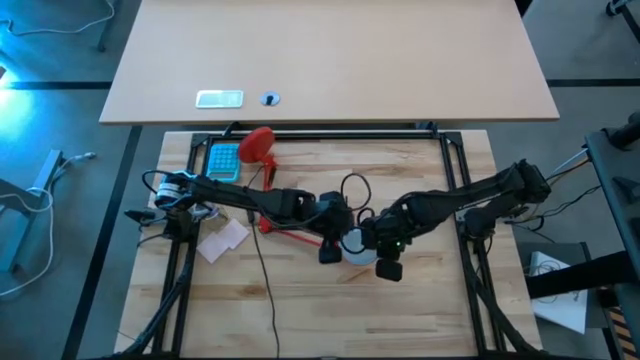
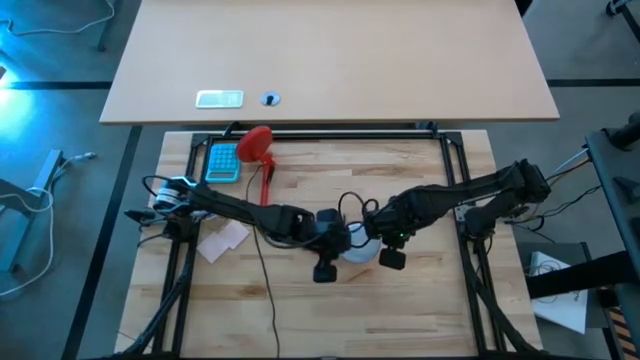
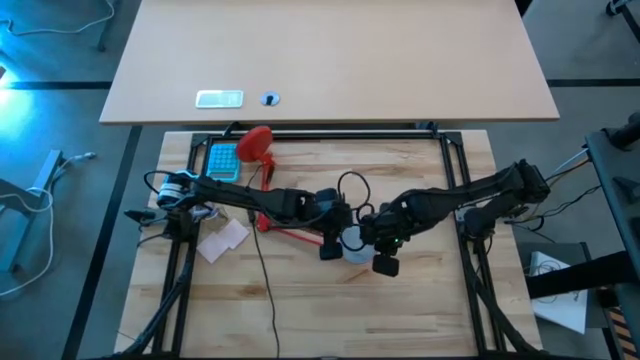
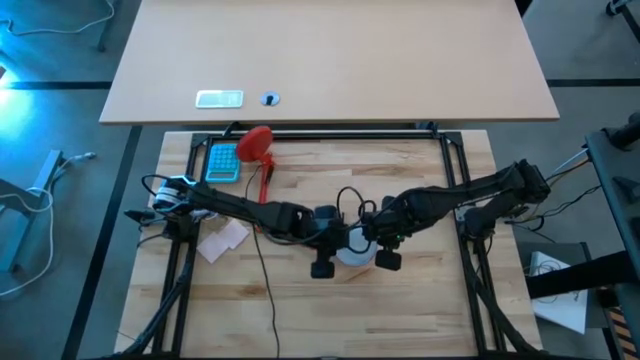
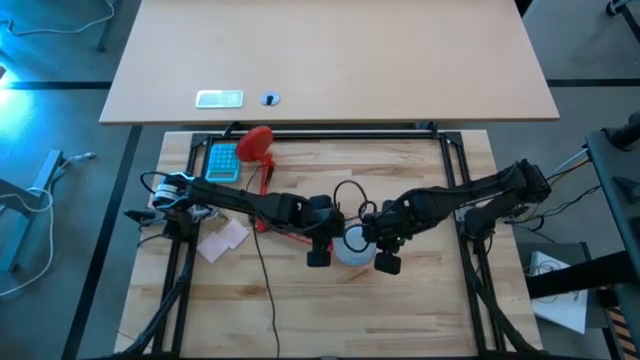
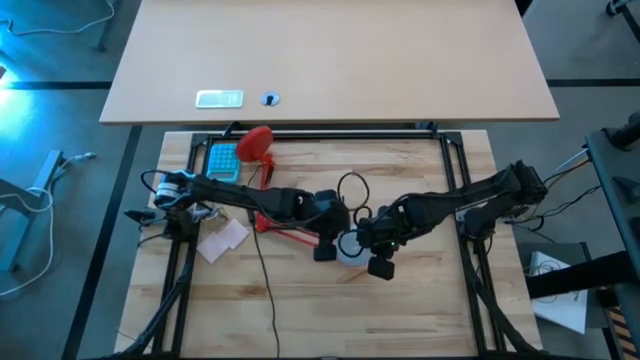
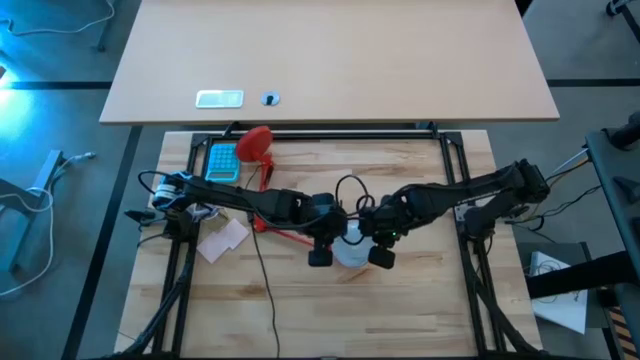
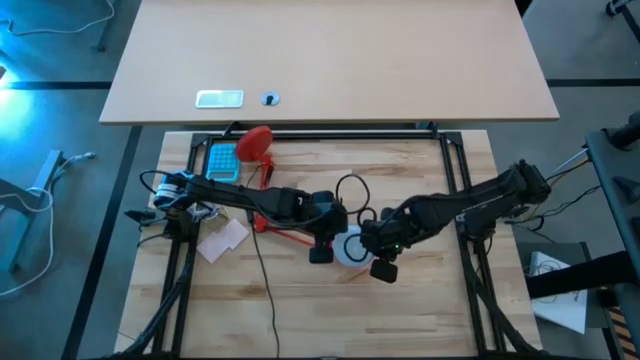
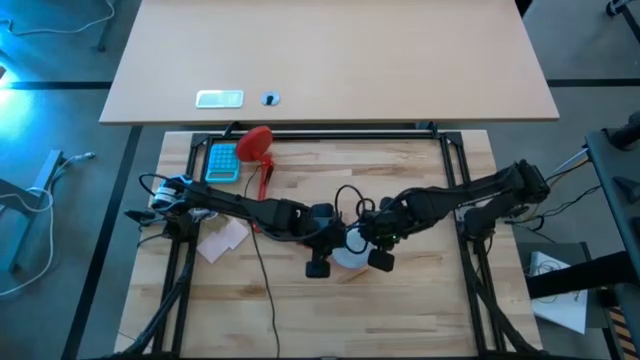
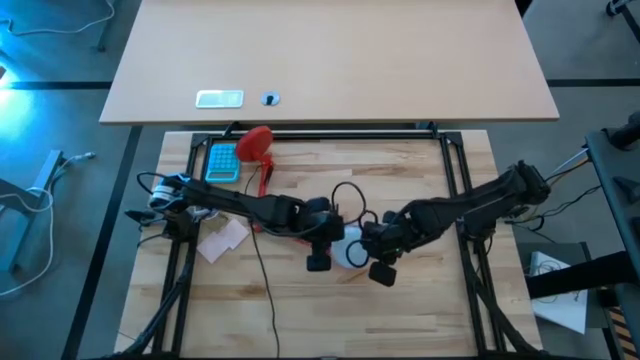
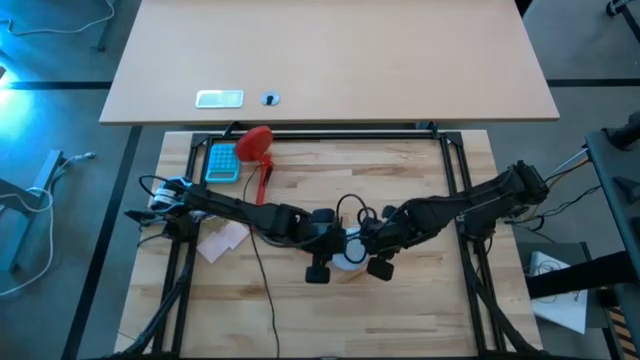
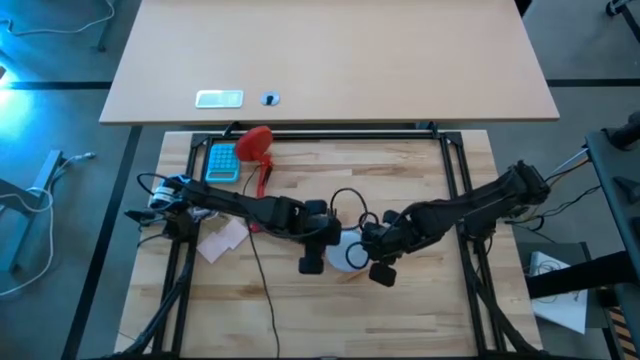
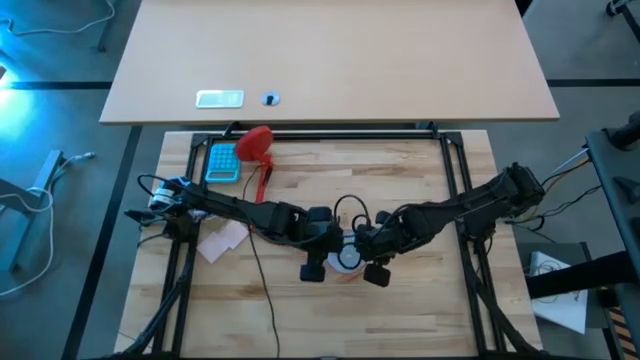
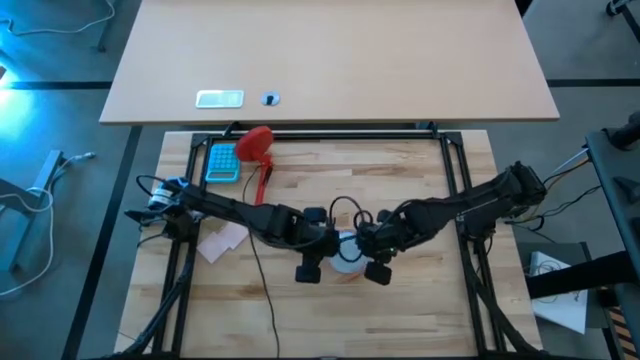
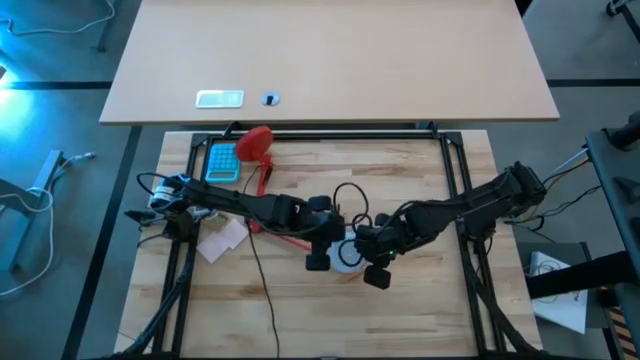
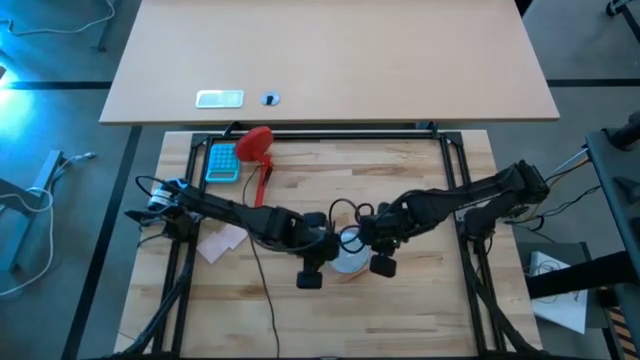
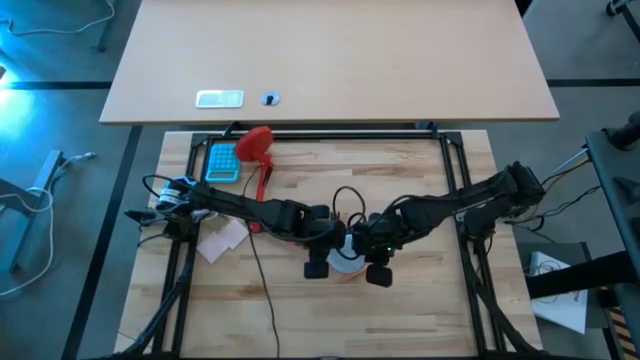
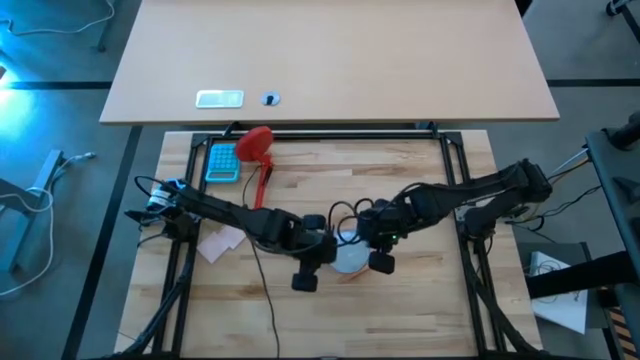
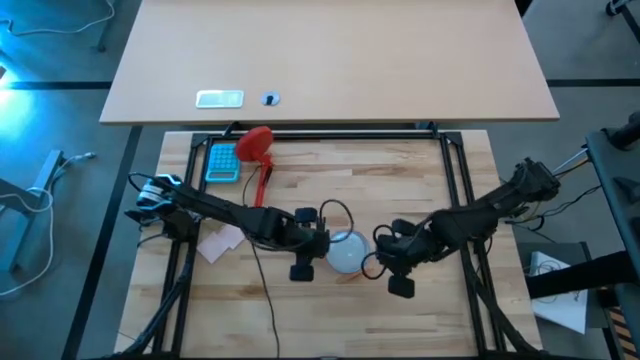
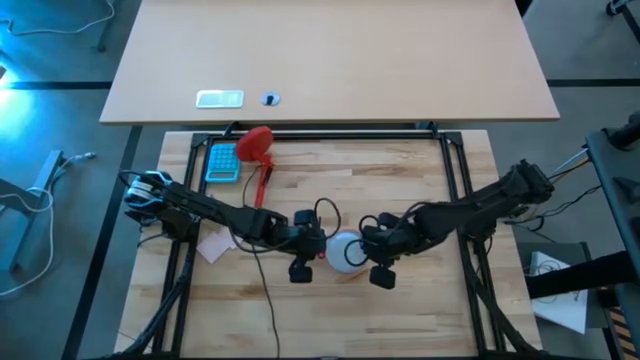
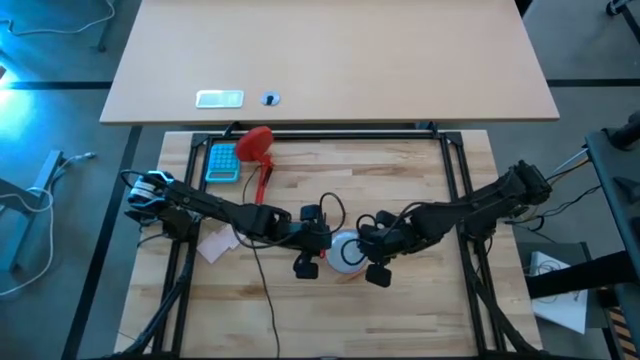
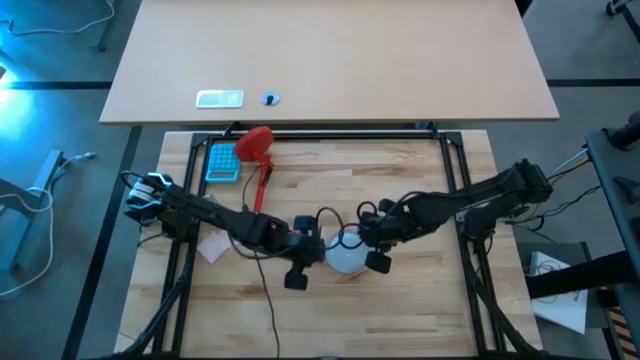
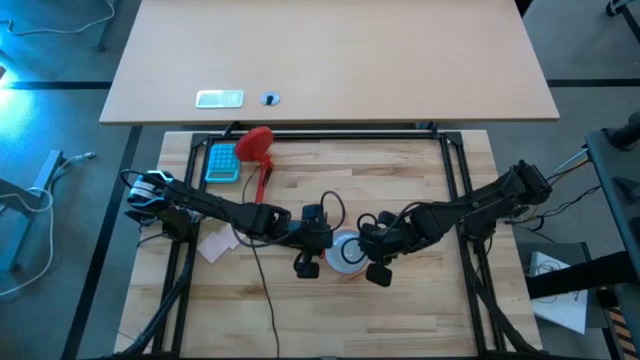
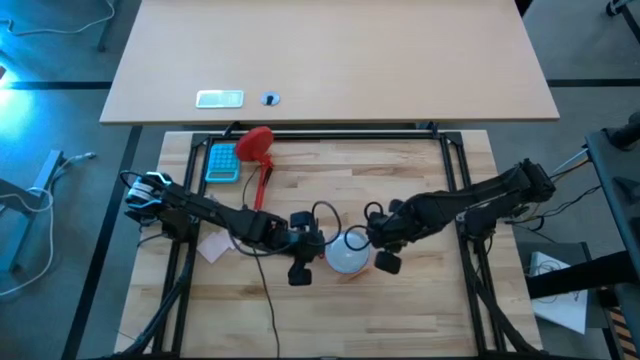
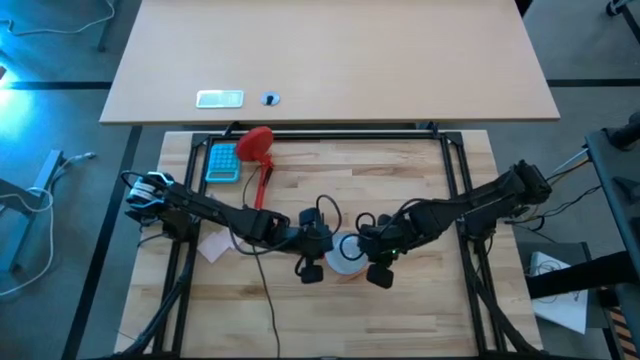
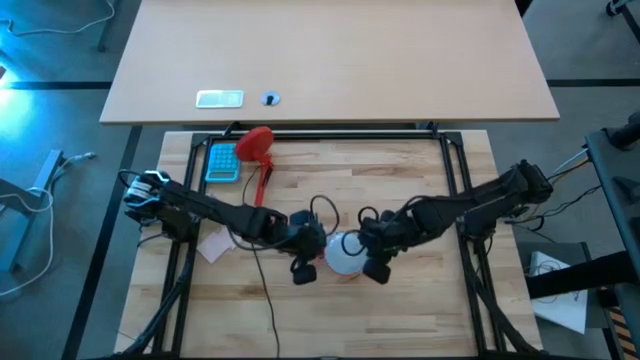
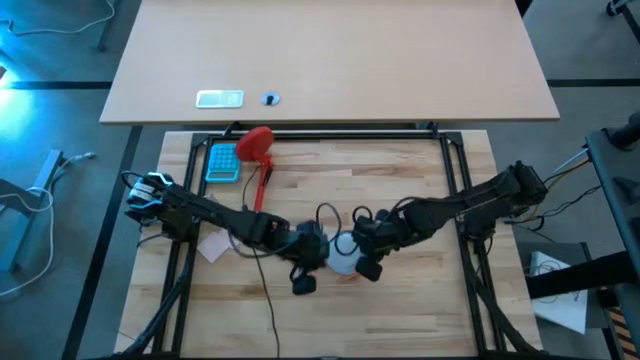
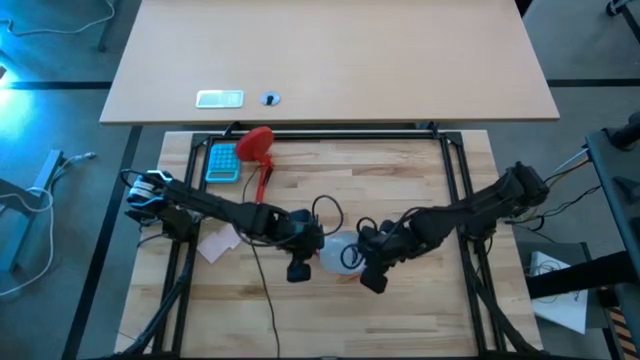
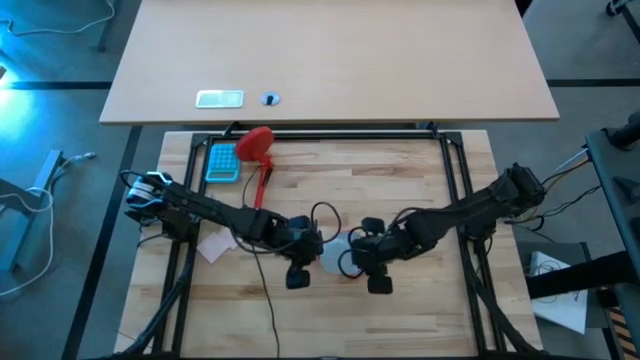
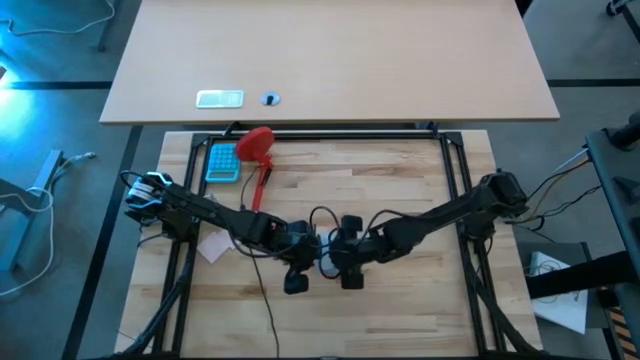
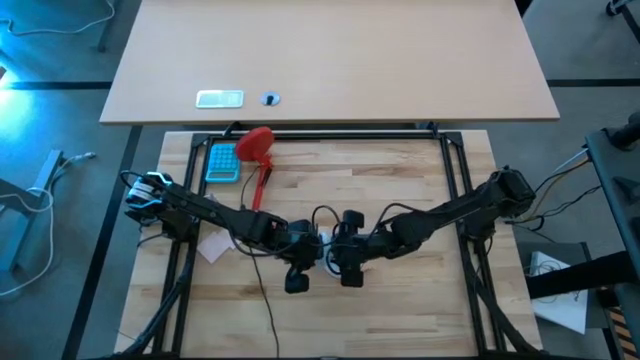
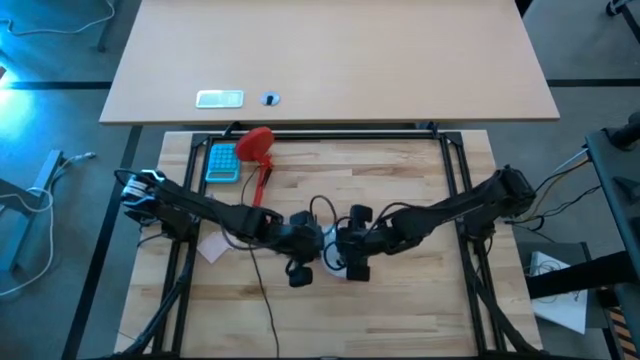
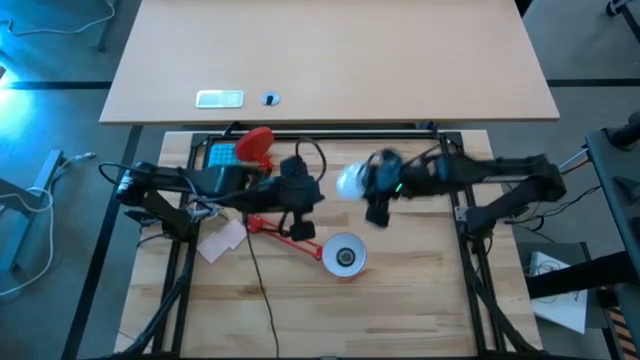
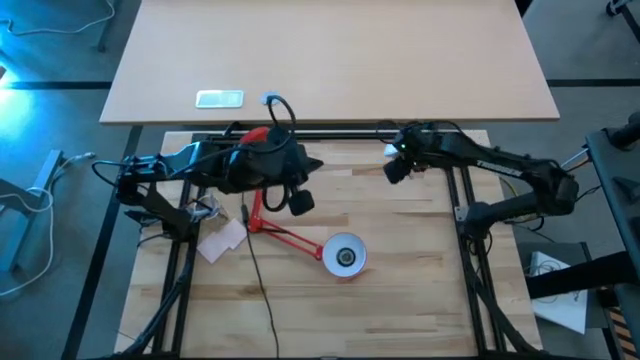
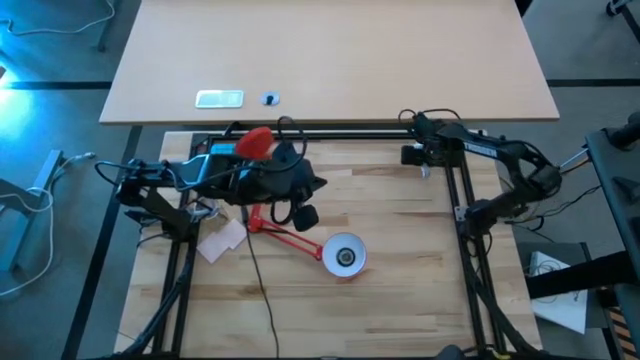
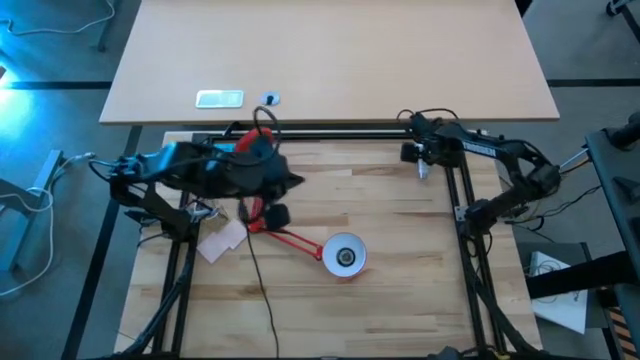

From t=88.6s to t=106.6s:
Task: Screw lightbulb
Remove the light bulb from the lamp
